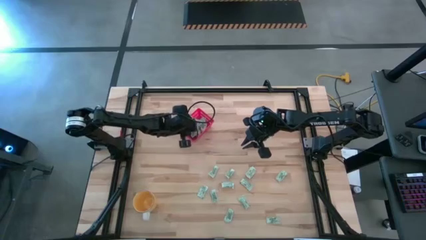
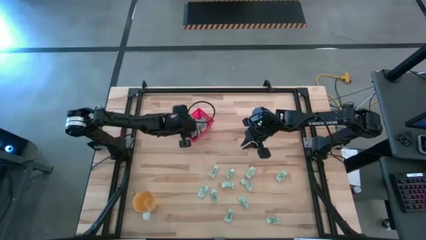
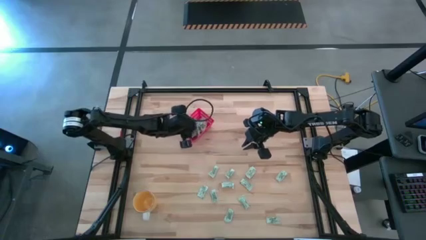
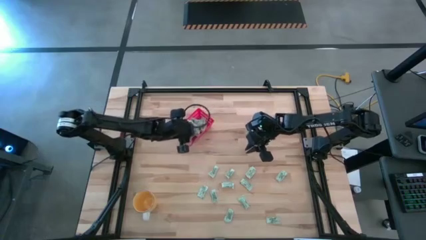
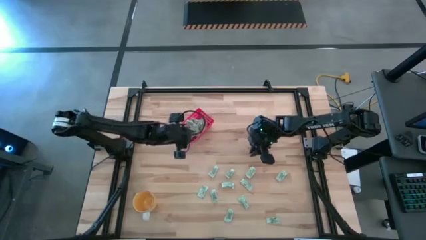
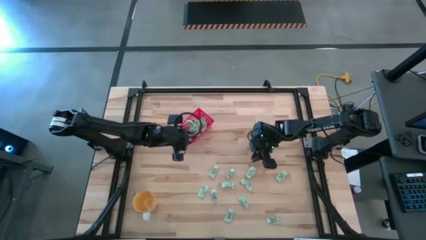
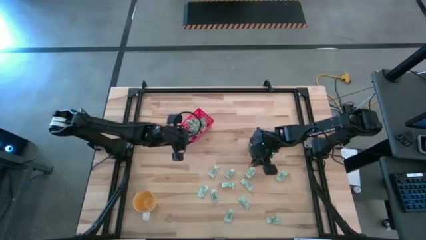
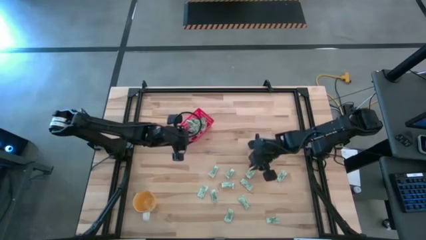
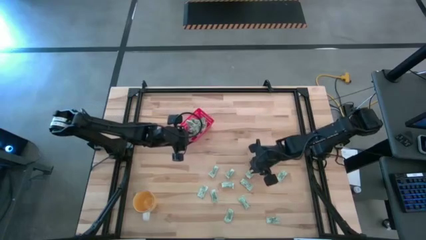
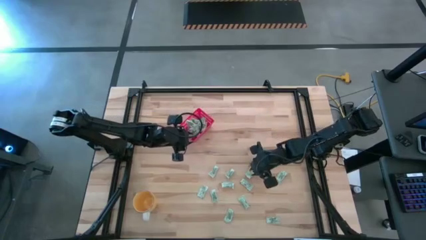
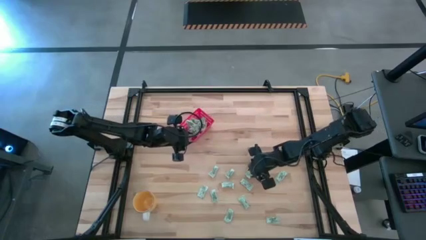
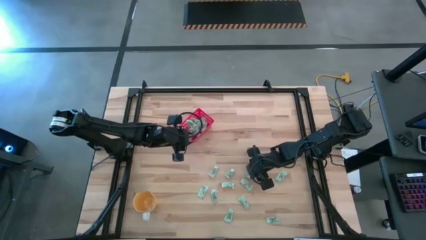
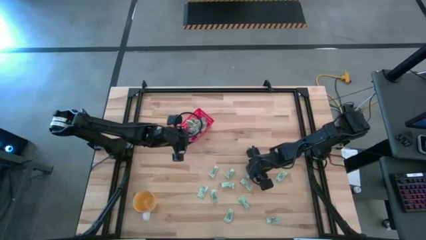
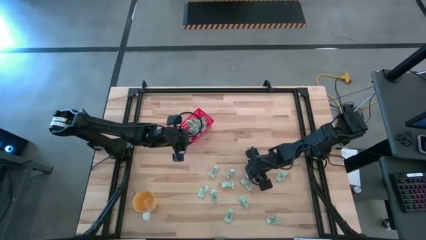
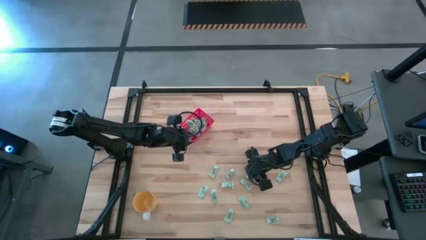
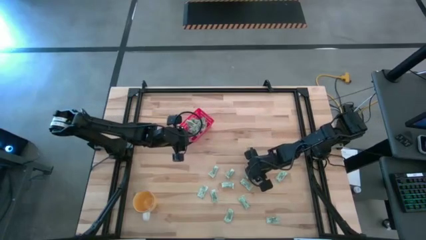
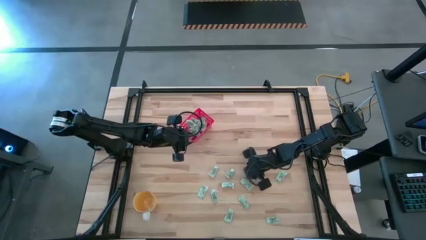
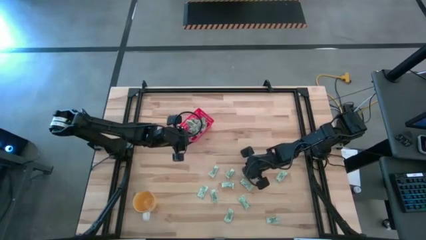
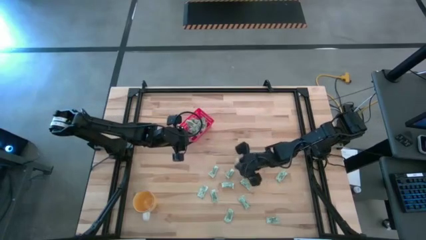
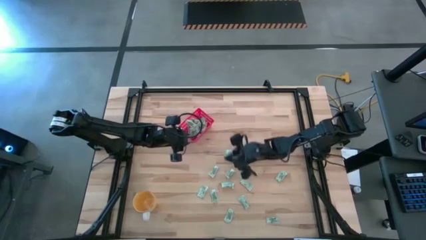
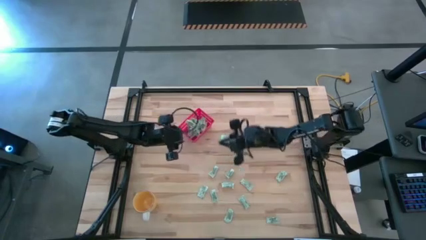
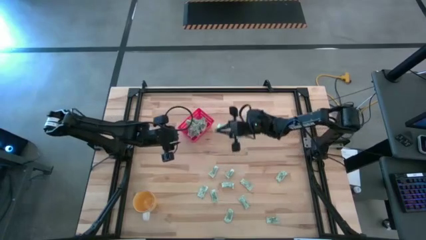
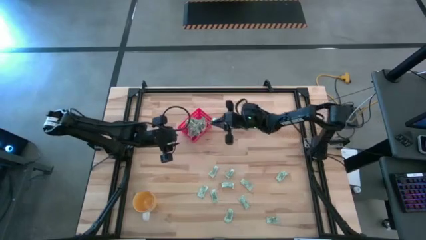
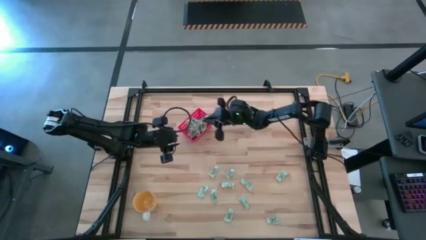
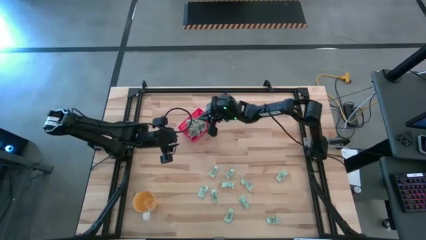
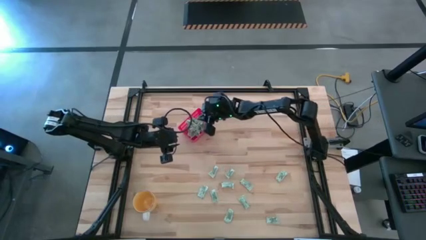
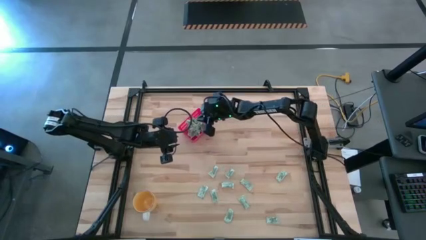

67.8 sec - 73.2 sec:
Task: Pick and place Stevia / Truvia into bins
Put the white stevia packet into the red bin

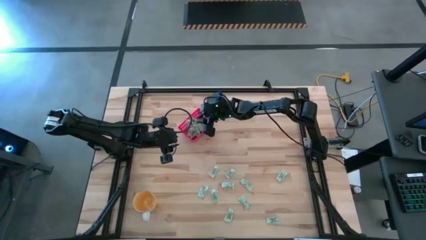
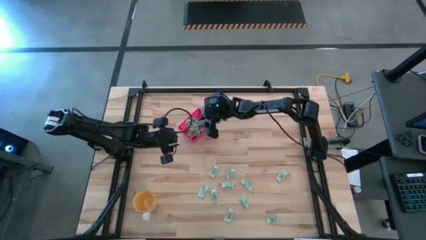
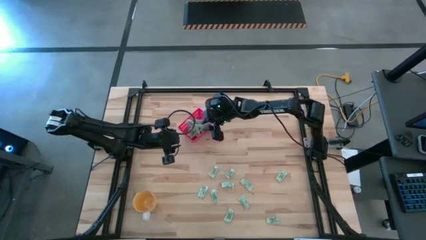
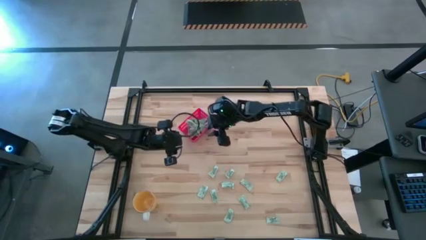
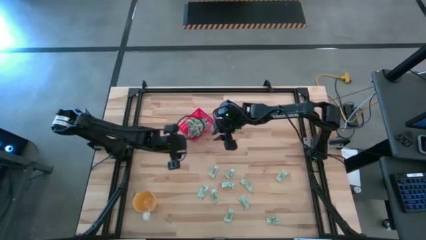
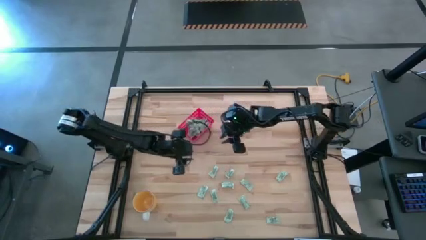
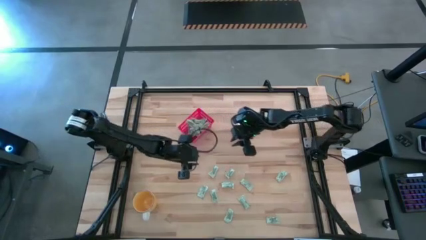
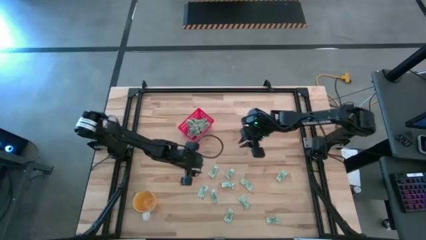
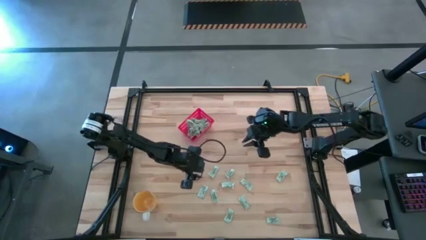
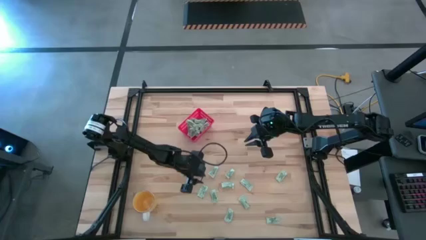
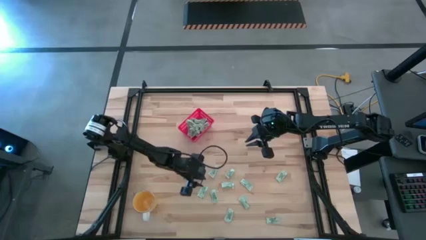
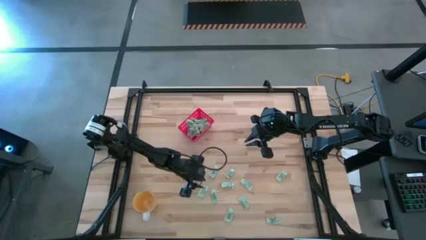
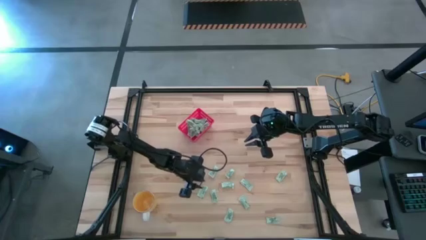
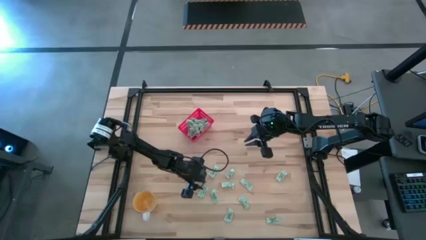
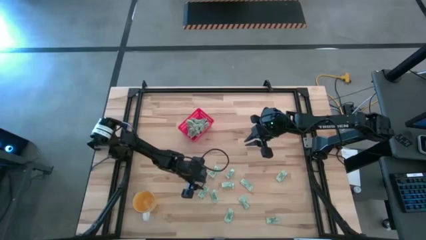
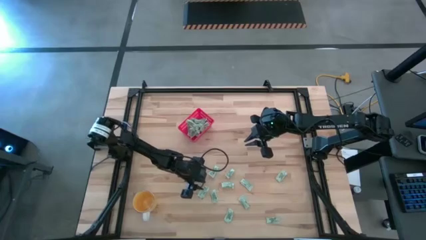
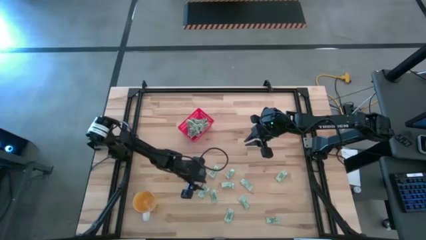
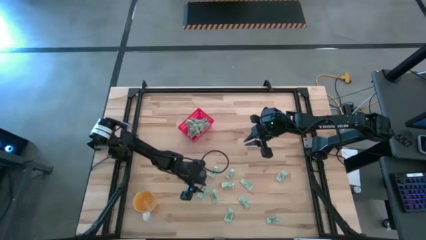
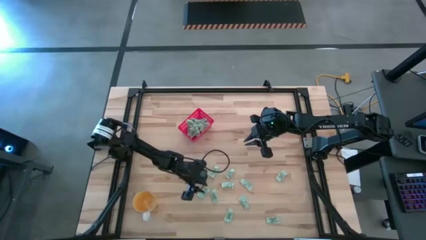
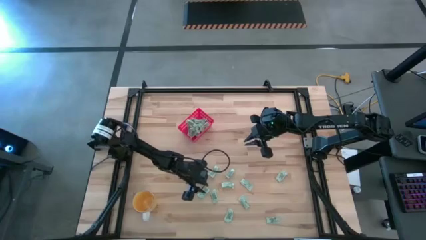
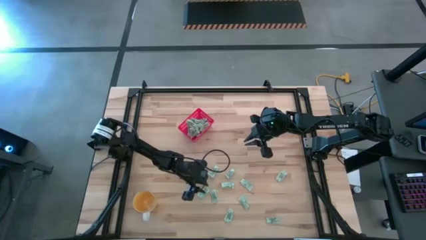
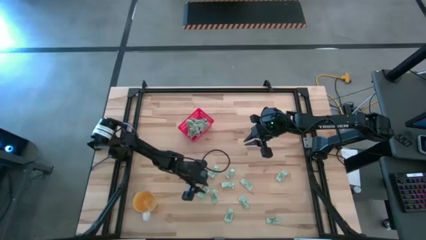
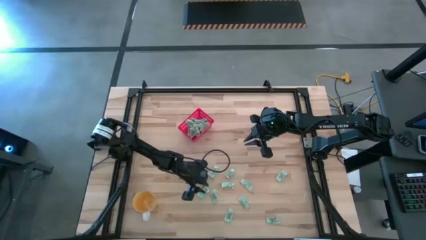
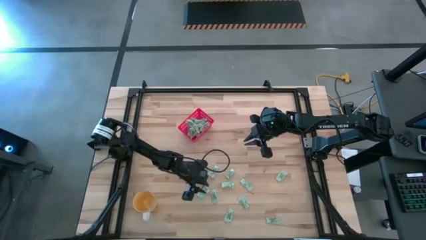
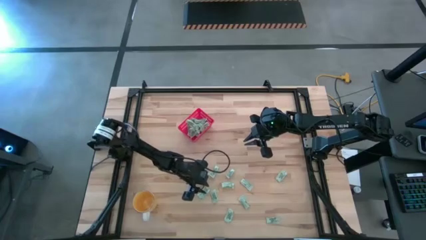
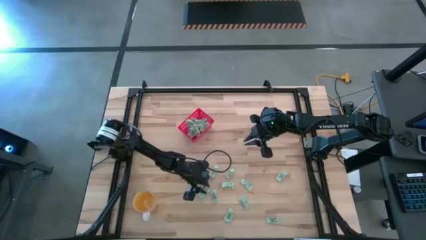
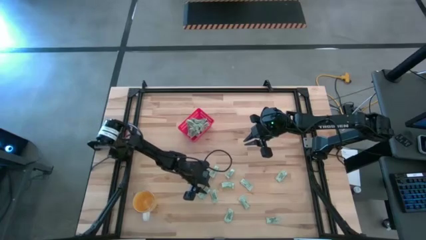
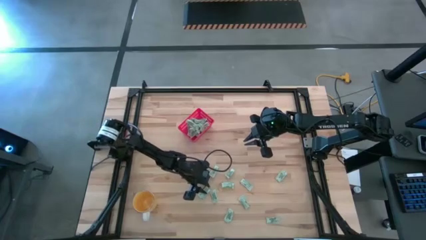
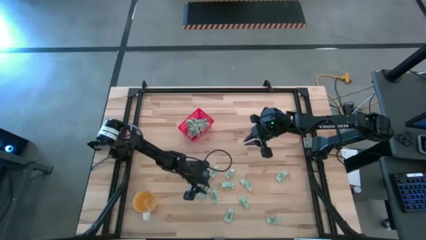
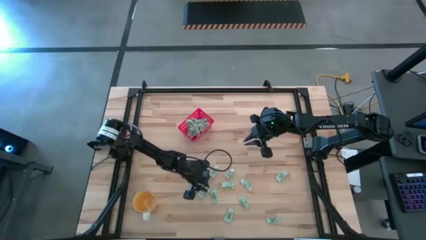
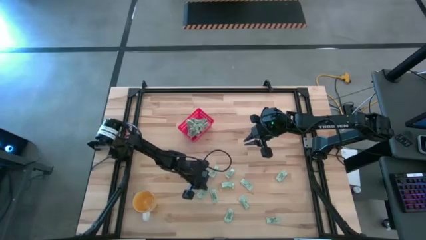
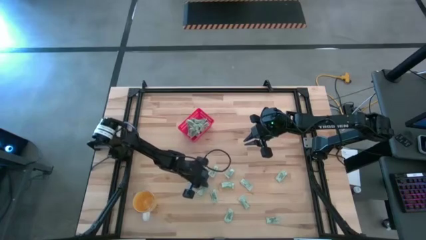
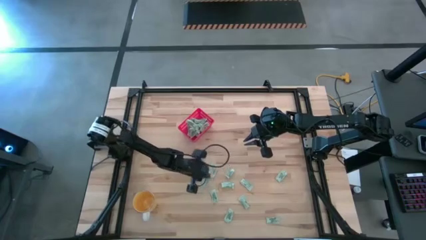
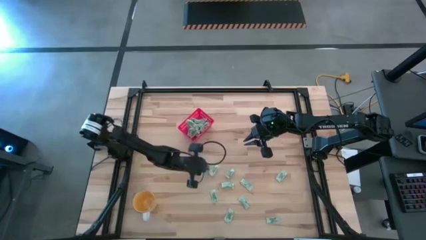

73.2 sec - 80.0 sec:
Put the white stevia packet into the red bin

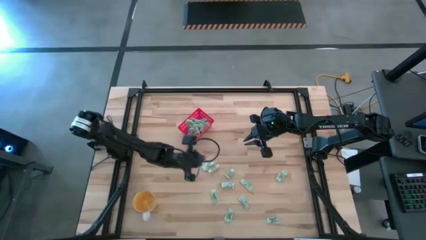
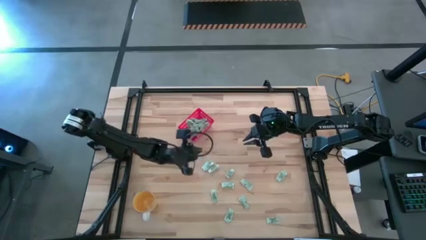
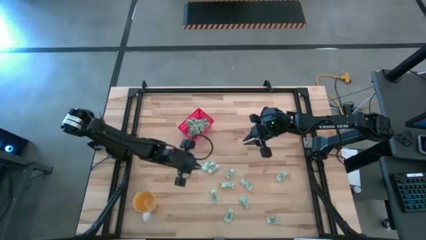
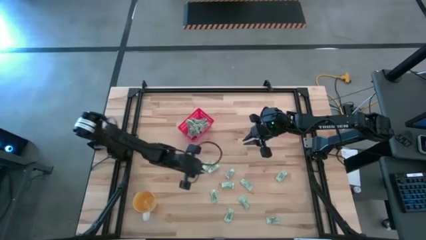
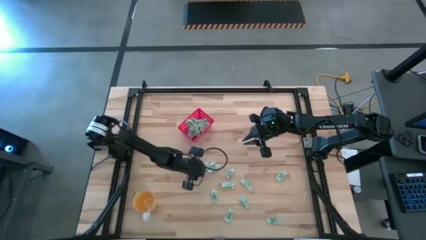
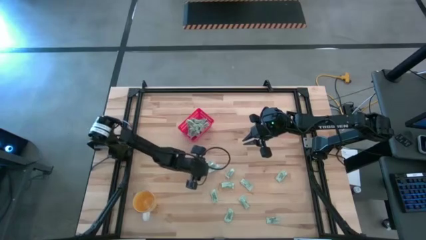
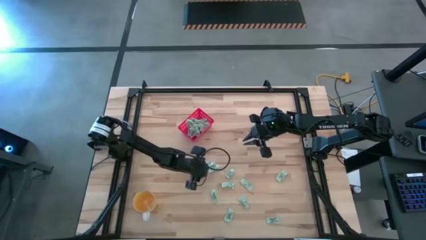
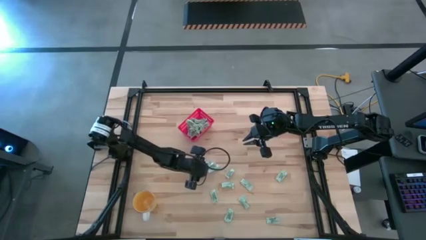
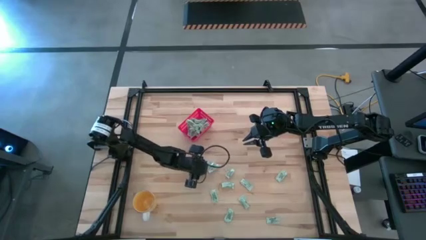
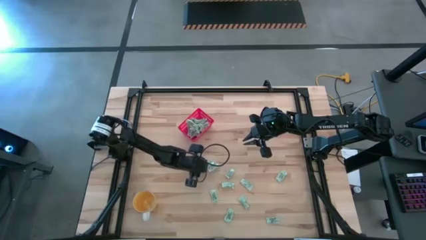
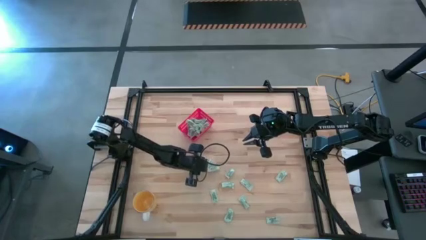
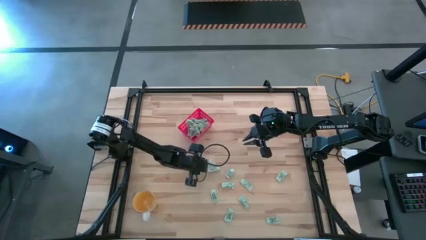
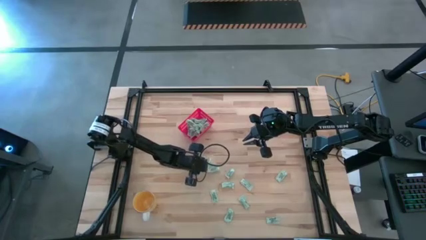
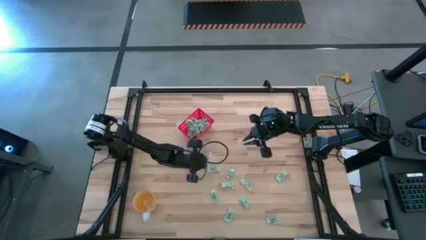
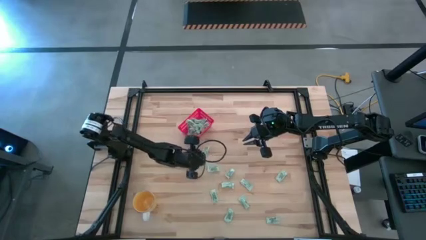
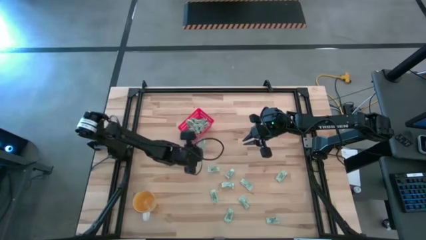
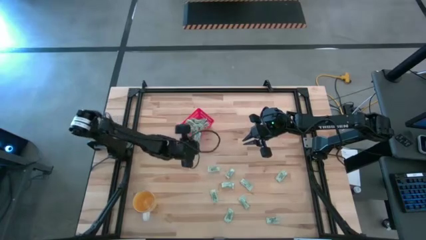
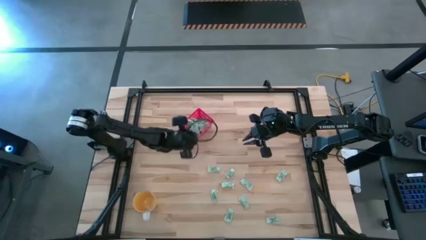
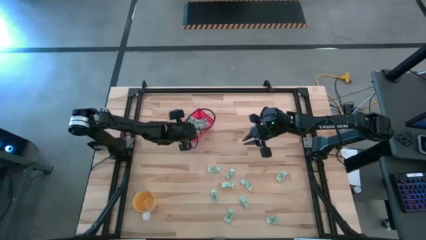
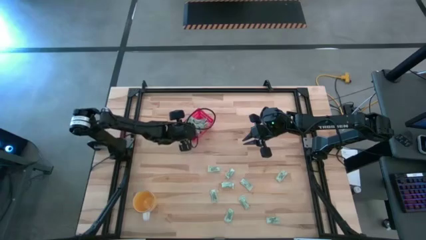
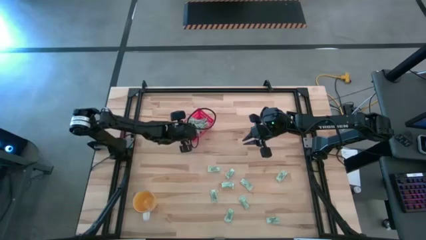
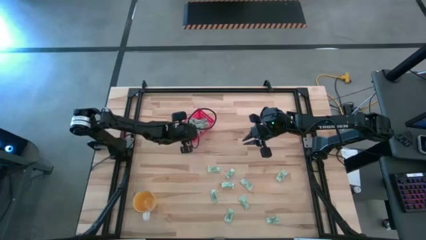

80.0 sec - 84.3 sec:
Put the white stevia packet into the red bin
